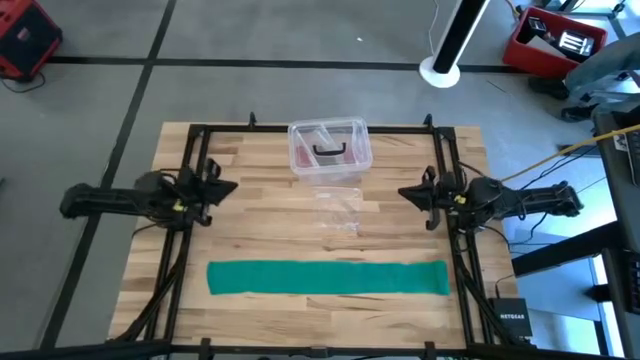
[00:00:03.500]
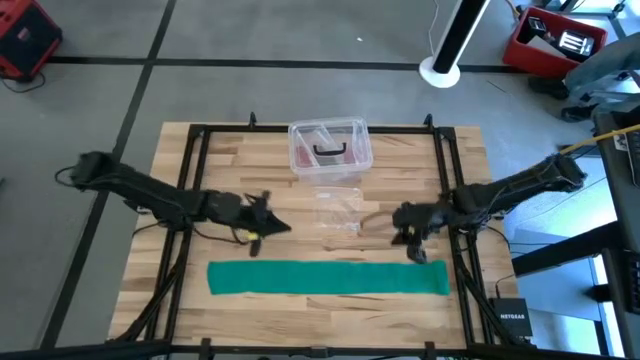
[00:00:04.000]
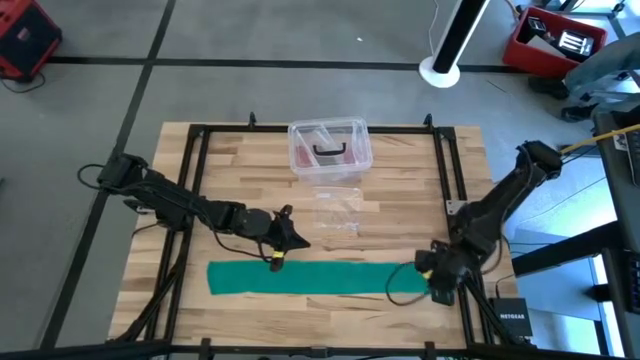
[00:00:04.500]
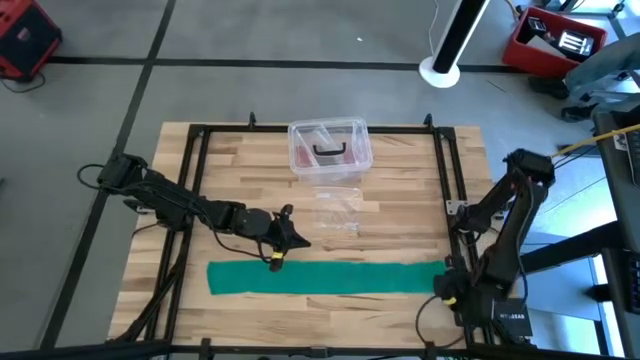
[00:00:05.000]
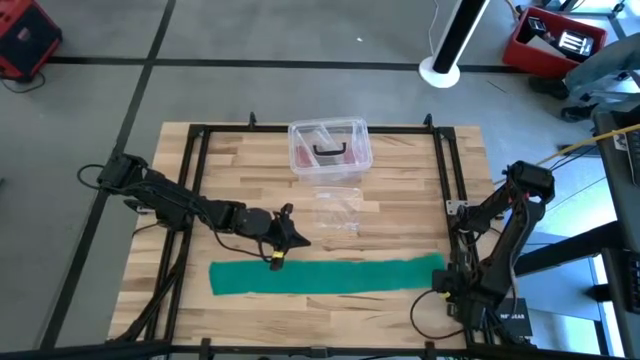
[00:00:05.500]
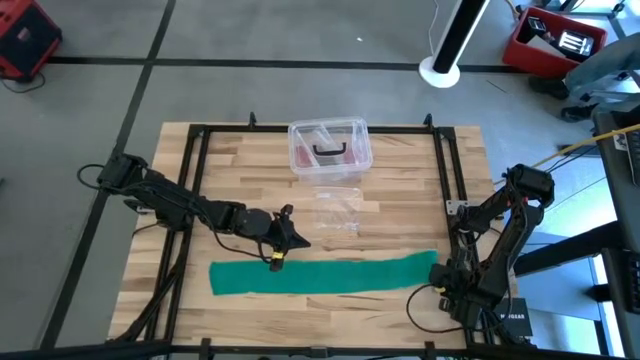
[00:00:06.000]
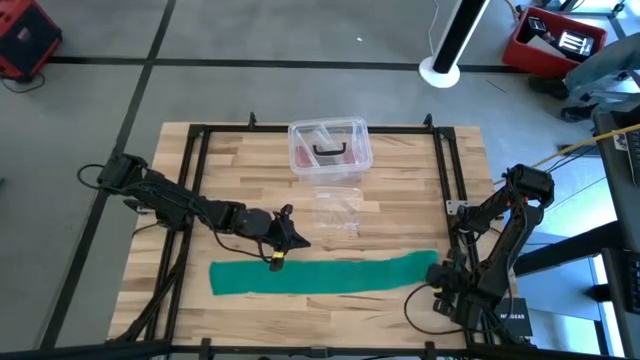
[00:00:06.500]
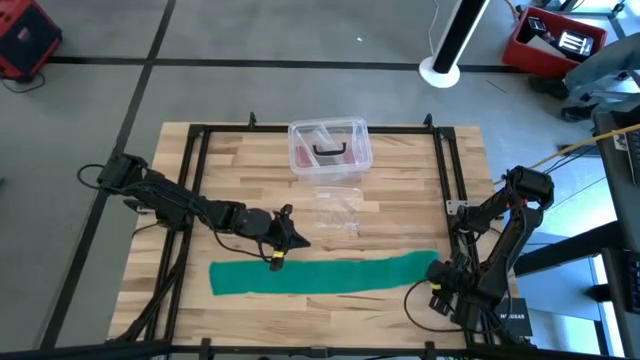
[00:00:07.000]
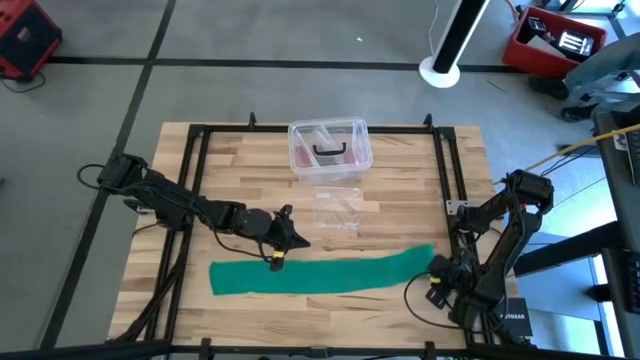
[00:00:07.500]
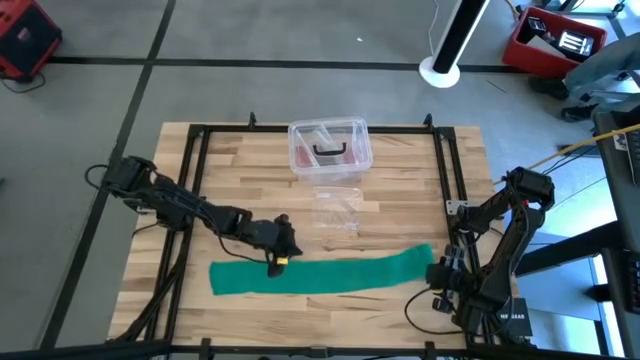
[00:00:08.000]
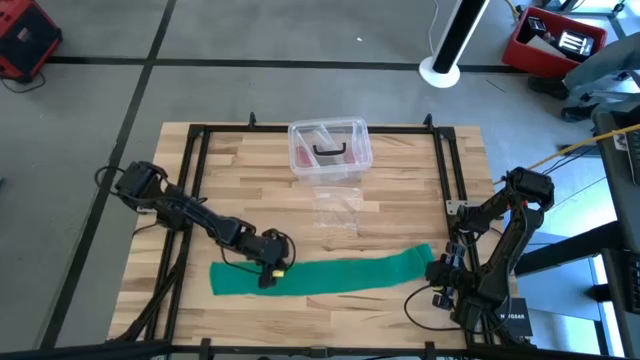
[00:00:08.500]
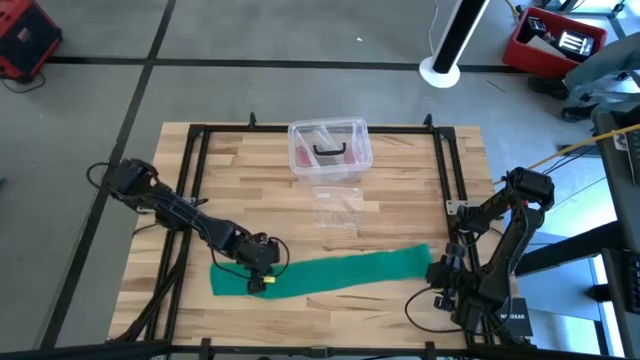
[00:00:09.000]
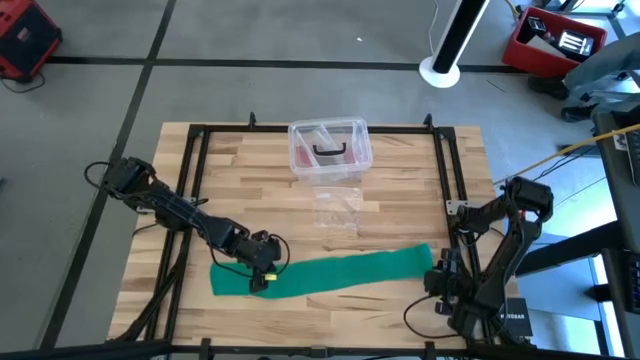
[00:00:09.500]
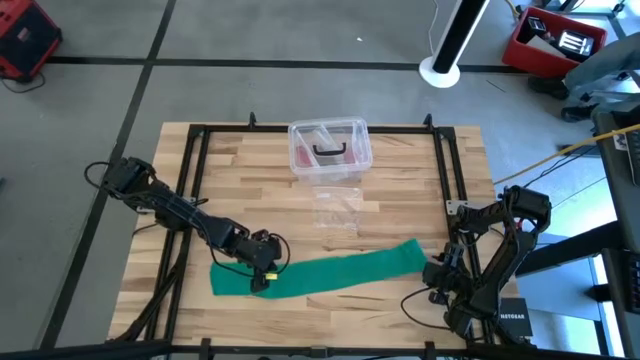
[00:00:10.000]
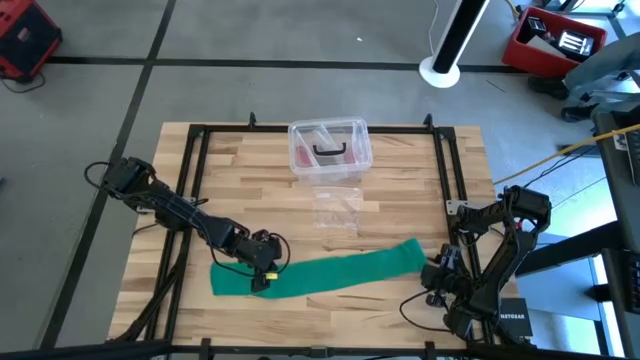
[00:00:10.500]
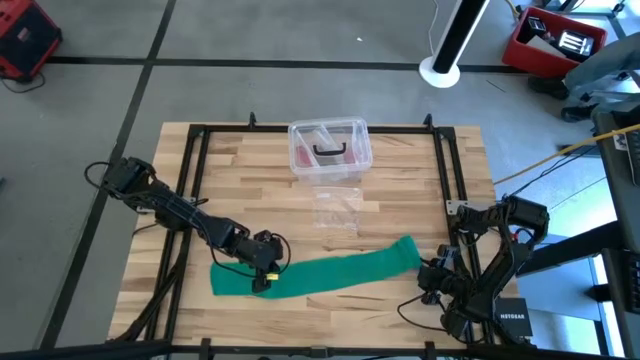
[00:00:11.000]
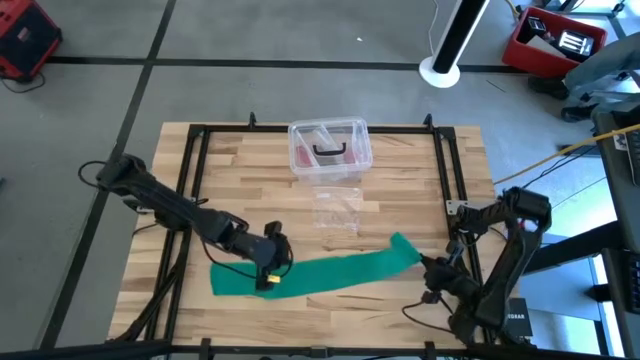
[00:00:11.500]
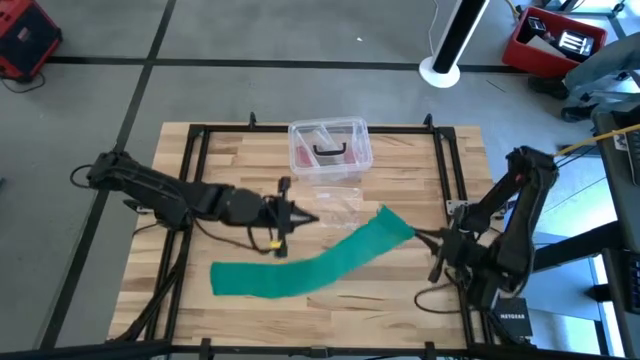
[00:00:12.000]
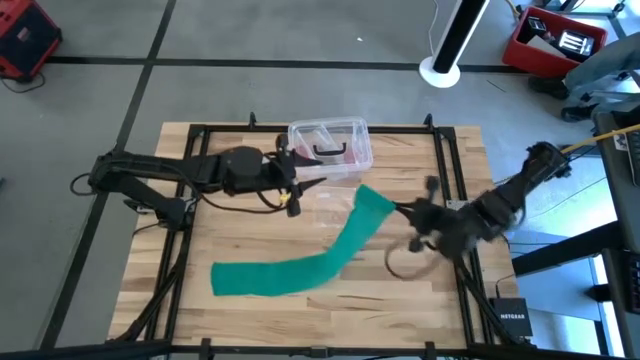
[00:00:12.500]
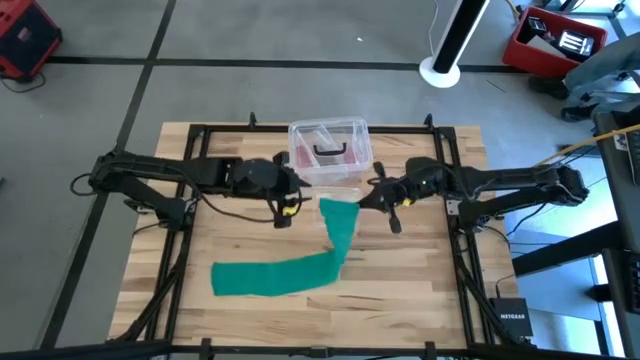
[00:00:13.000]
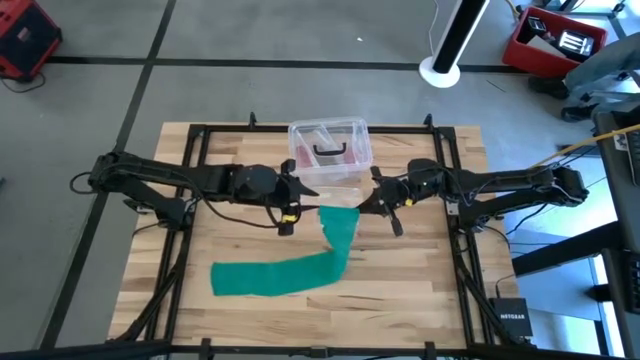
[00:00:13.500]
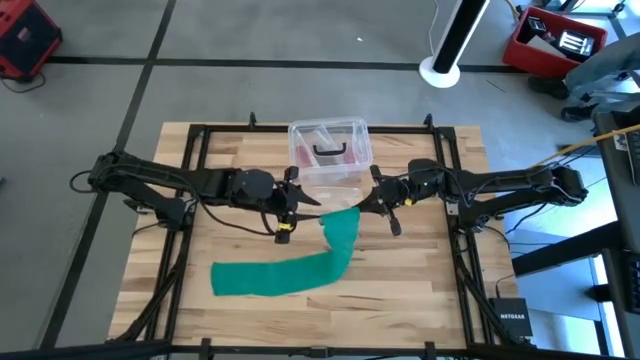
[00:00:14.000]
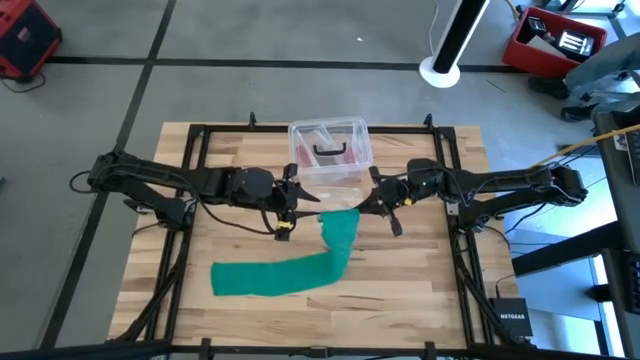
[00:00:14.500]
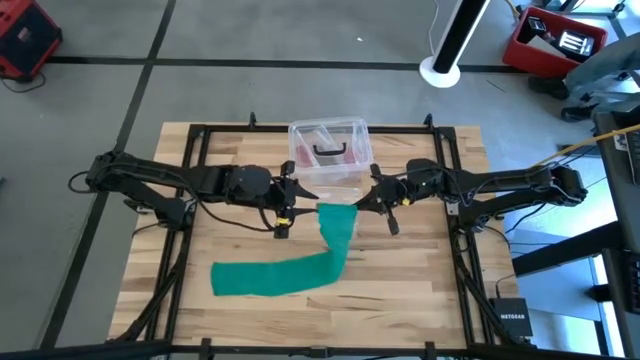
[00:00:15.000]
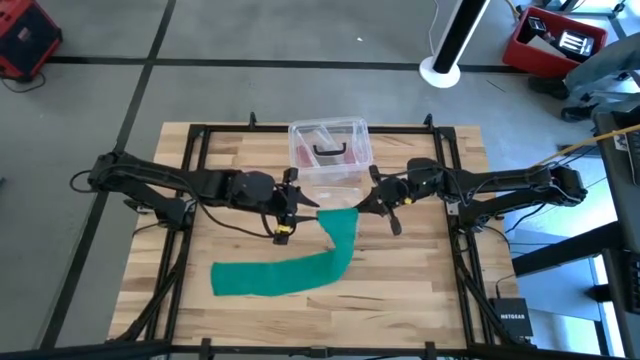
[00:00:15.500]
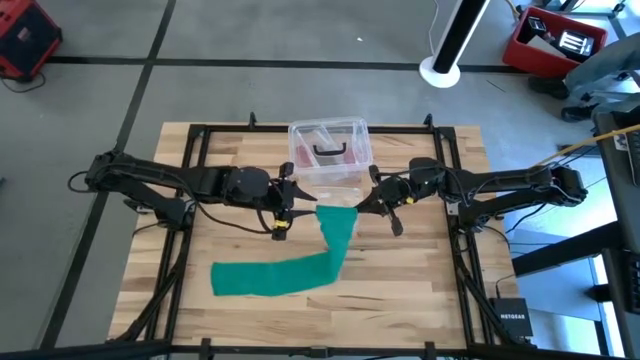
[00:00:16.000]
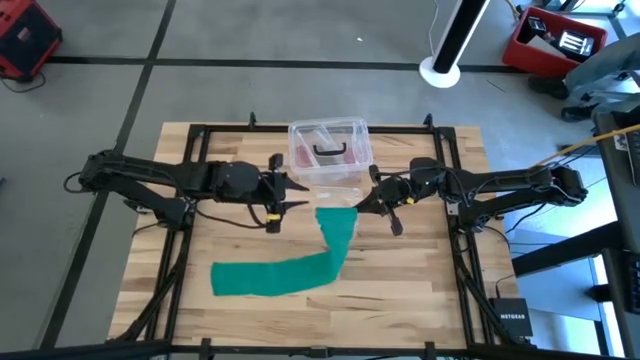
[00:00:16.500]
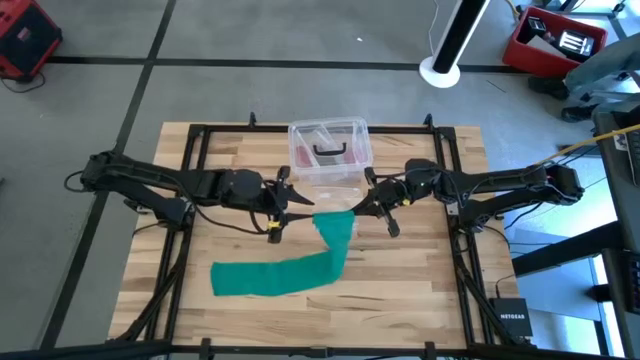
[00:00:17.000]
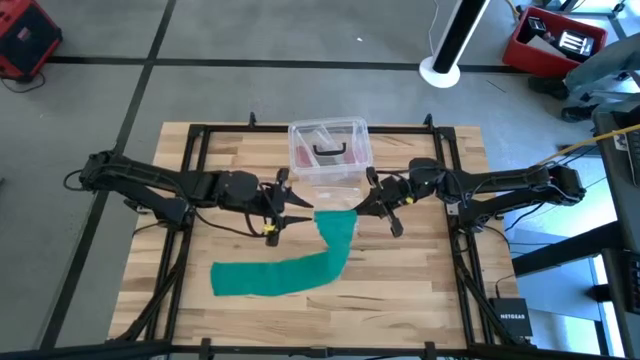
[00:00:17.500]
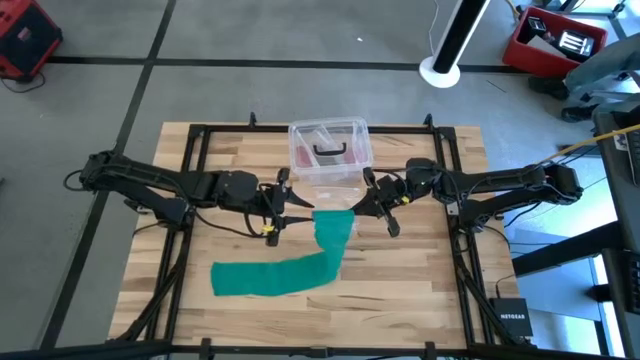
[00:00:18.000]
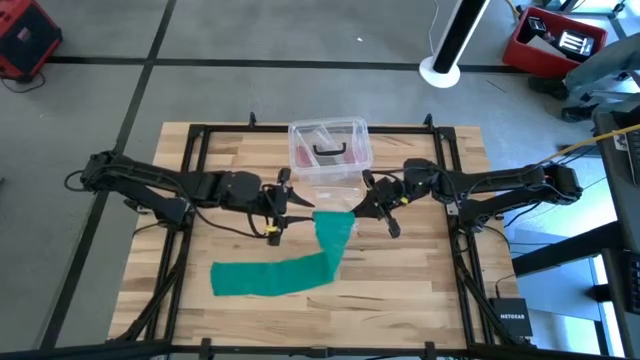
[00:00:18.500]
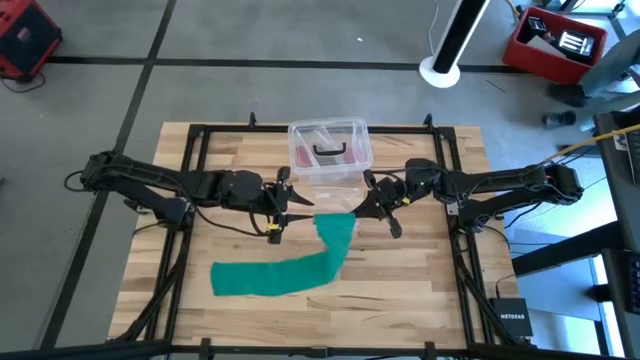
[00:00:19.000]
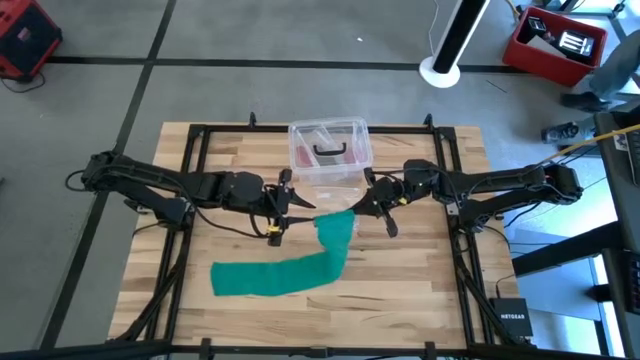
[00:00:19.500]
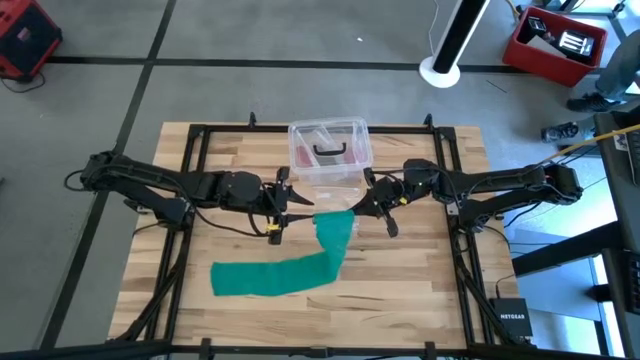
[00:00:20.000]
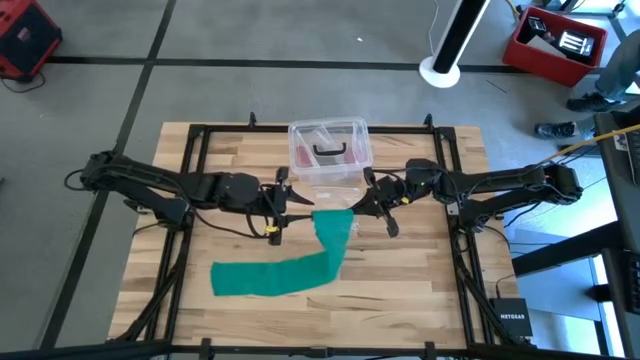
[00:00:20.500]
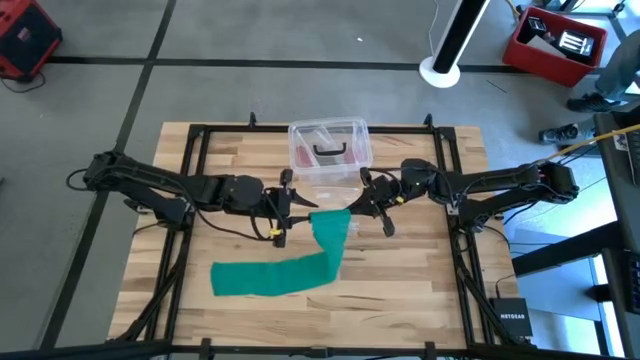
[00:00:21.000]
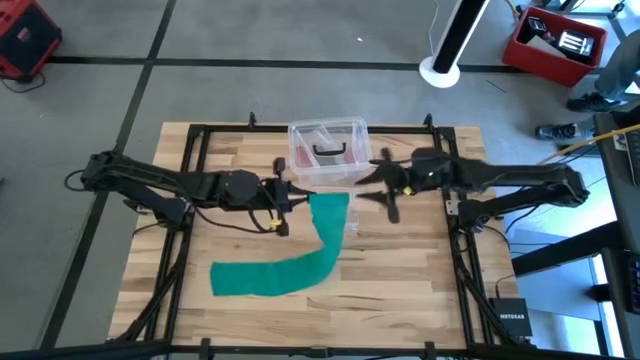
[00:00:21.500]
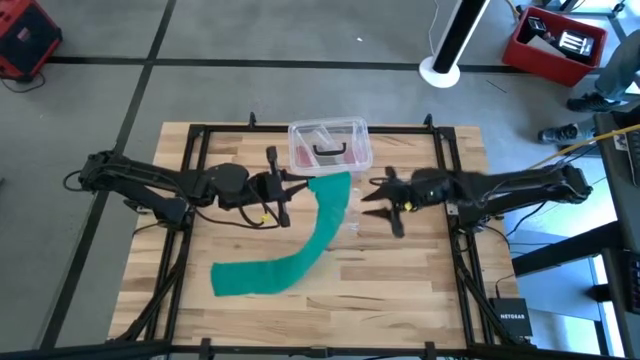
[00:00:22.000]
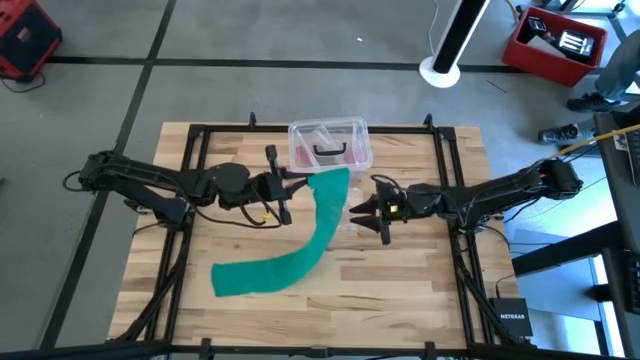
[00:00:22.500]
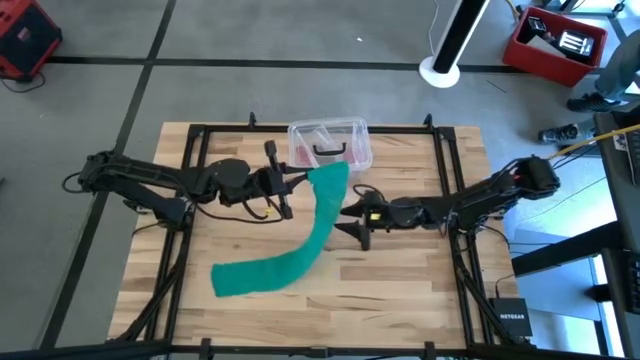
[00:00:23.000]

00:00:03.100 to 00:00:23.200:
Task: Roll bandage
Roll the green bandage
